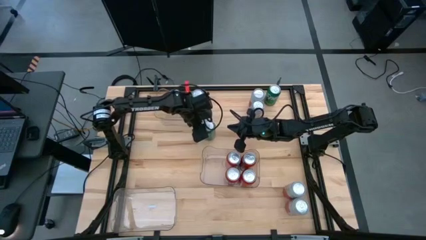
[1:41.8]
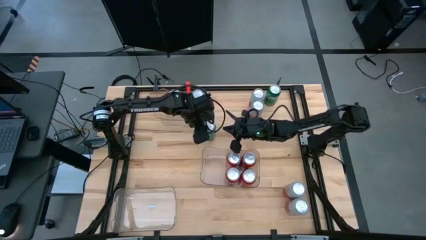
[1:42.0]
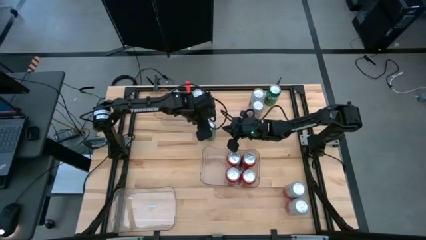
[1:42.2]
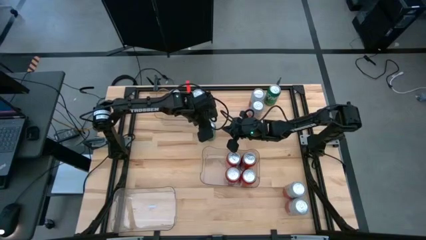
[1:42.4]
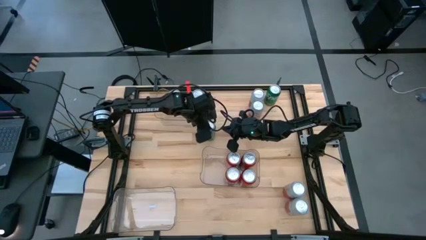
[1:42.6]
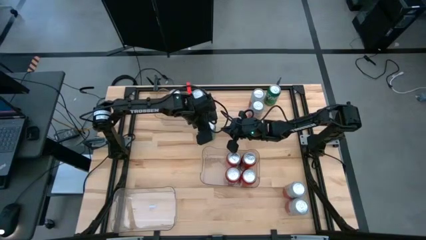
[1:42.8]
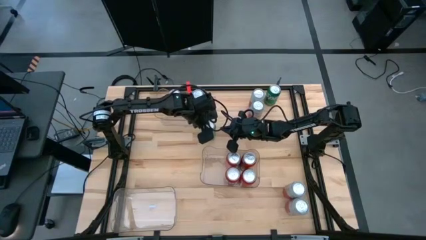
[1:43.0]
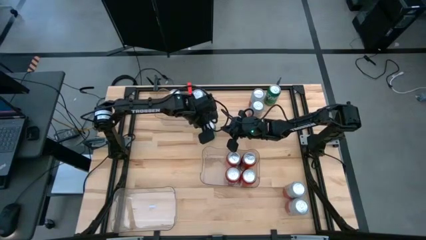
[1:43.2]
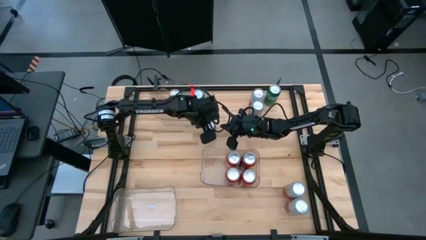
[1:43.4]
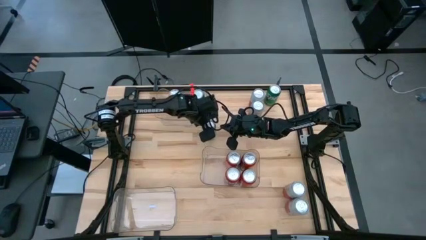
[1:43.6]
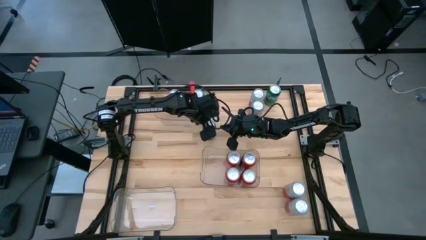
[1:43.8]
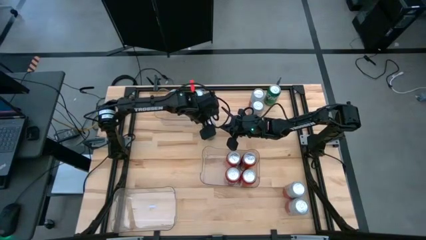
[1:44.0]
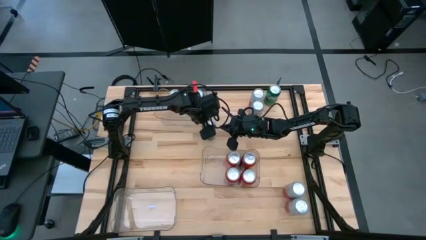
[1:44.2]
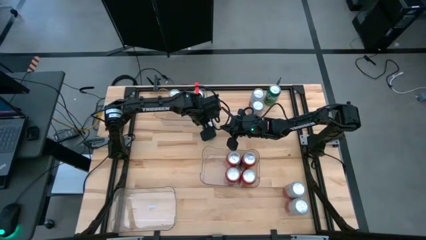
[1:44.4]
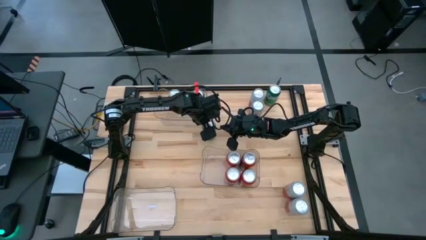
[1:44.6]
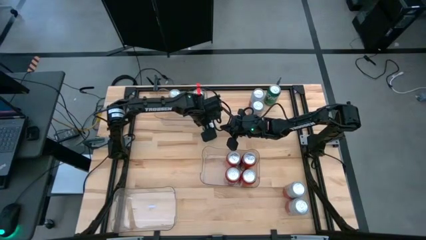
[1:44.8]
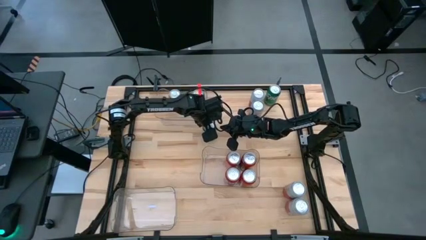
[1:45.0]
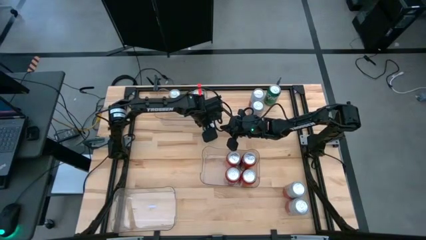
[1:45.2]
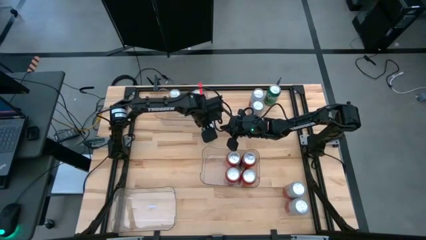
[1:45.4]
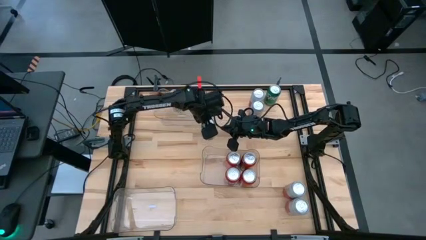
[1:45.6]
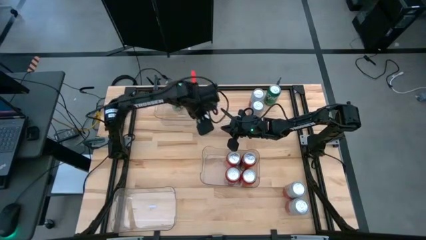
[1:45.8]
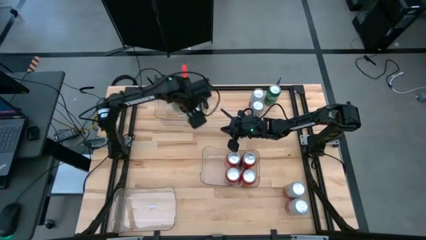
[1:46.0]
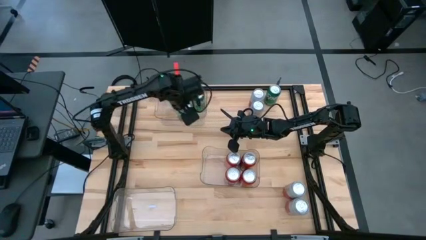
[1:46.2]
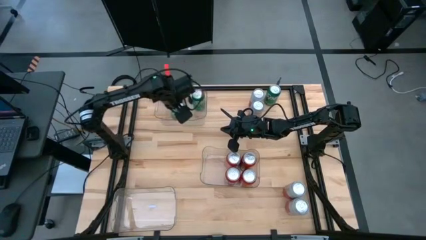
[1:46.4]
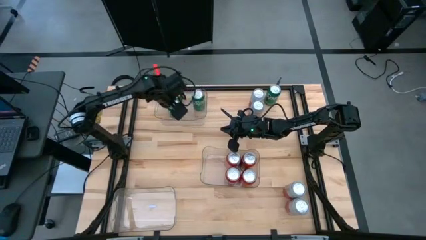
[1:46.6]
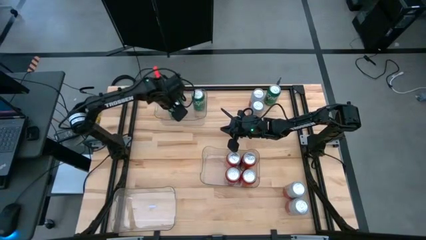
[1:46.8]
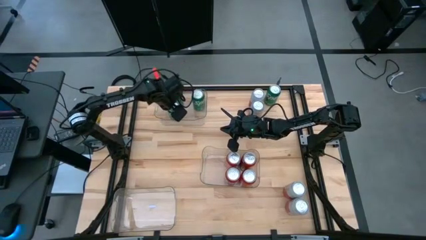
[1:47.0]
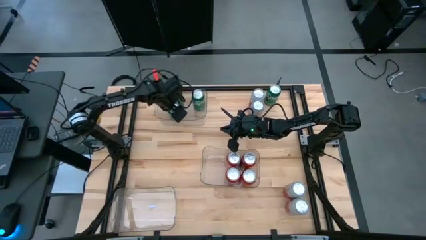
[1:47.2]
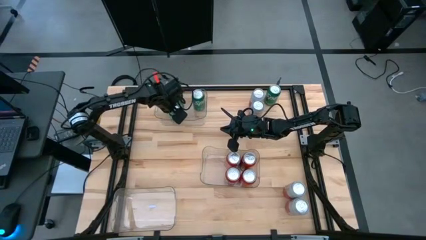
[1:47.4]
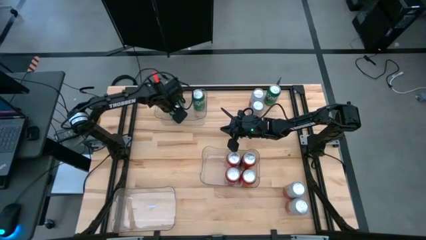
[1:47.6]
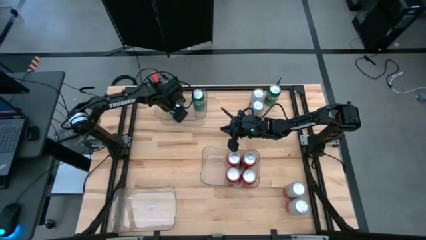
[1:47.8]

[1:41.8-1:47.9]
Task: Sort soda cans
Put the sprite soda can into the top left transparent bin

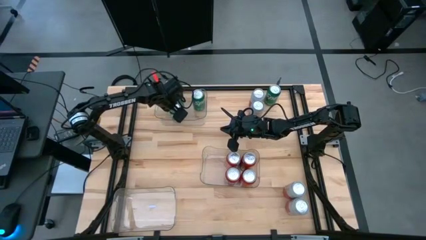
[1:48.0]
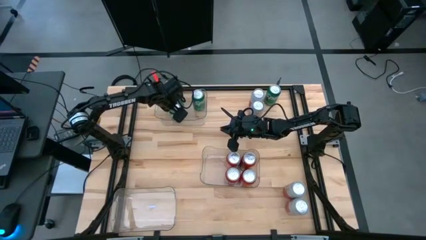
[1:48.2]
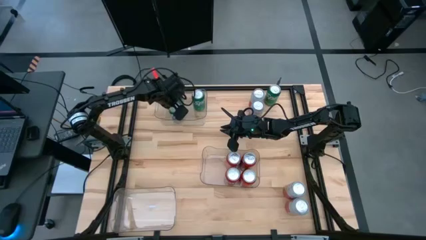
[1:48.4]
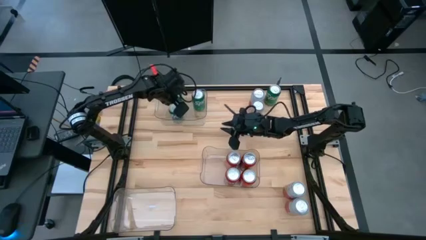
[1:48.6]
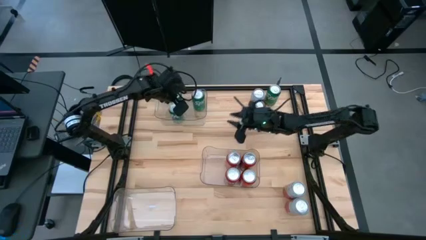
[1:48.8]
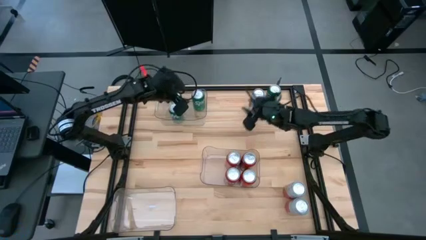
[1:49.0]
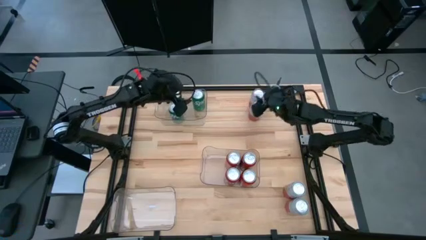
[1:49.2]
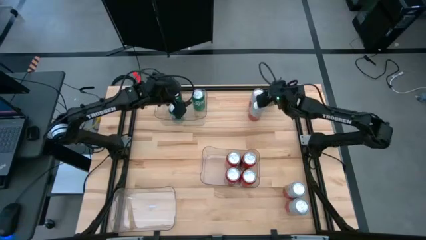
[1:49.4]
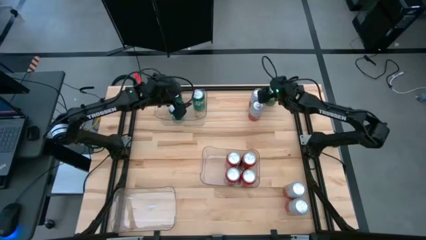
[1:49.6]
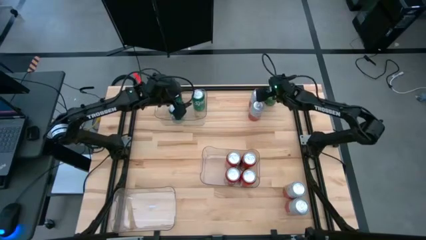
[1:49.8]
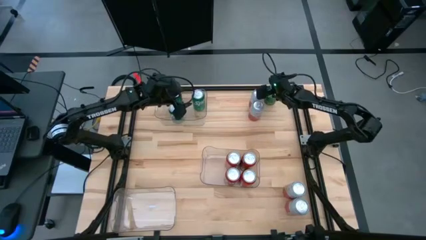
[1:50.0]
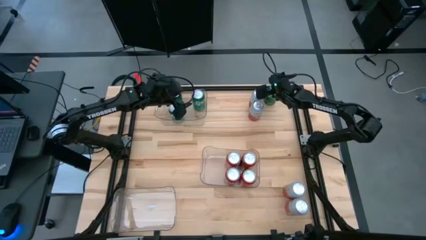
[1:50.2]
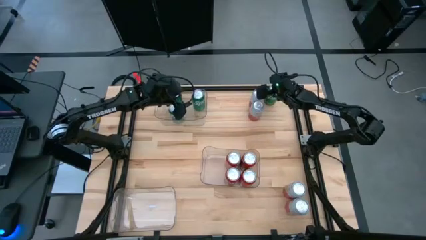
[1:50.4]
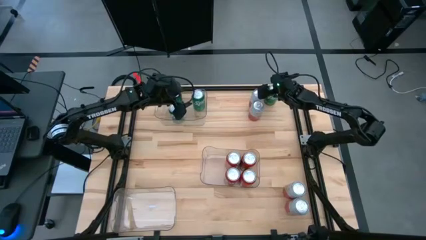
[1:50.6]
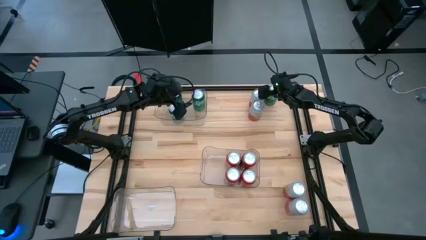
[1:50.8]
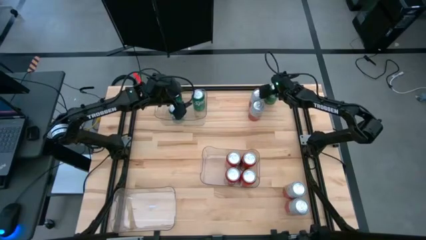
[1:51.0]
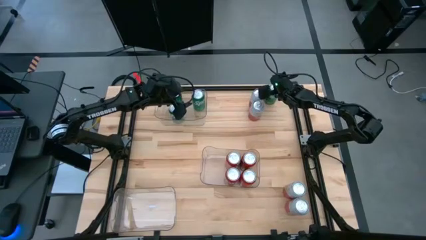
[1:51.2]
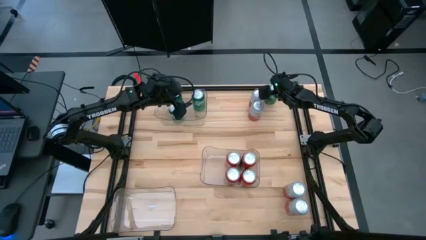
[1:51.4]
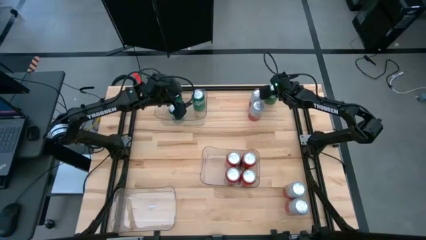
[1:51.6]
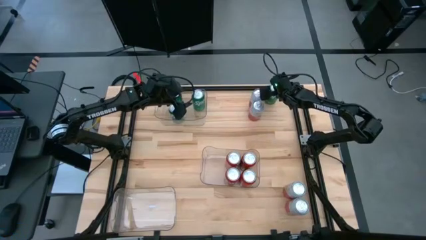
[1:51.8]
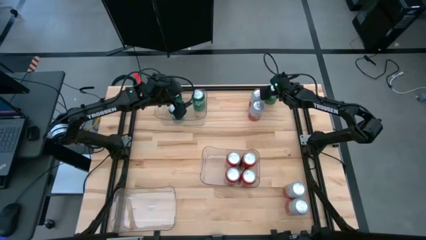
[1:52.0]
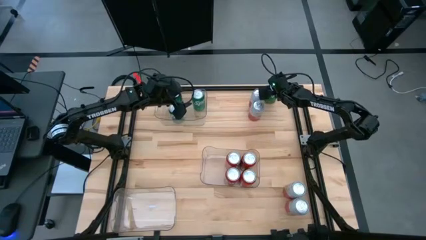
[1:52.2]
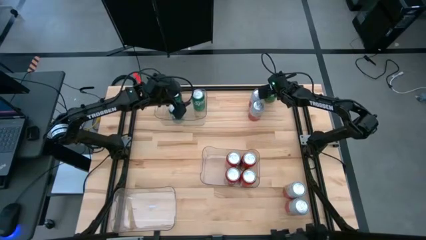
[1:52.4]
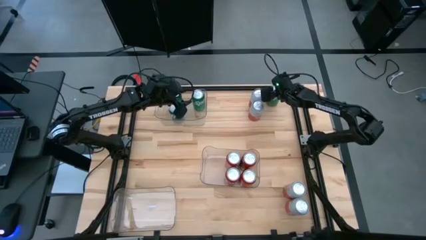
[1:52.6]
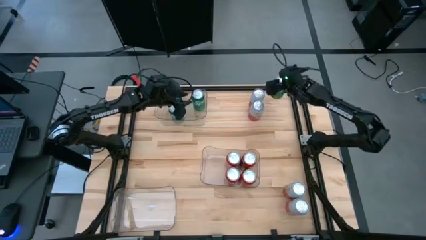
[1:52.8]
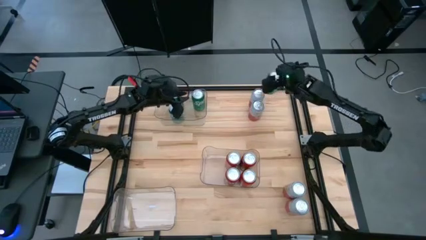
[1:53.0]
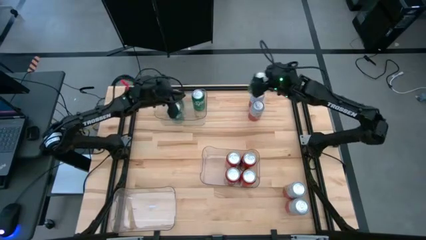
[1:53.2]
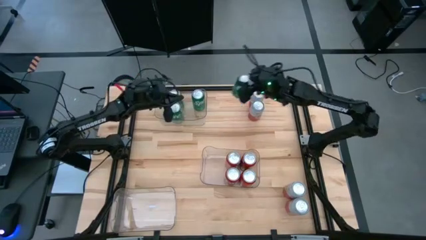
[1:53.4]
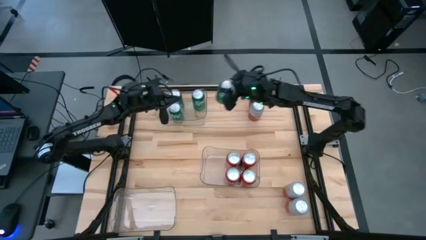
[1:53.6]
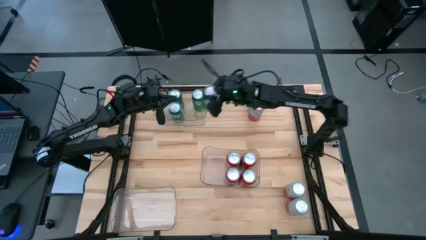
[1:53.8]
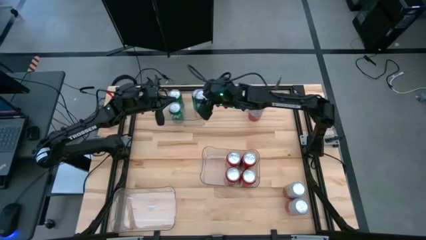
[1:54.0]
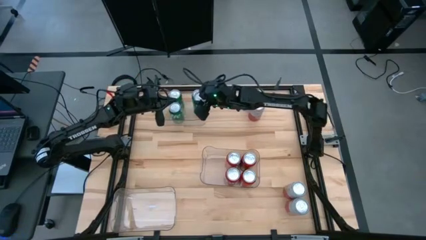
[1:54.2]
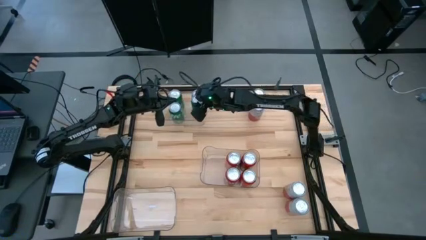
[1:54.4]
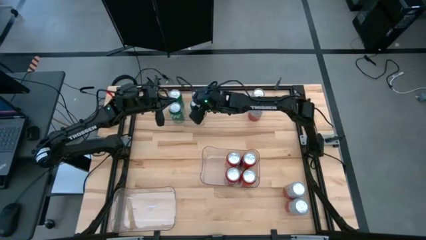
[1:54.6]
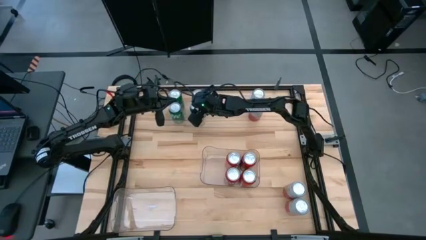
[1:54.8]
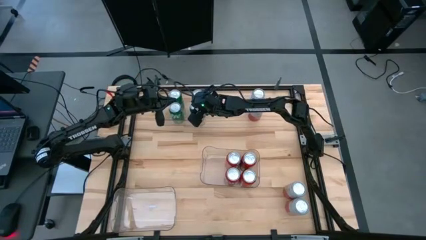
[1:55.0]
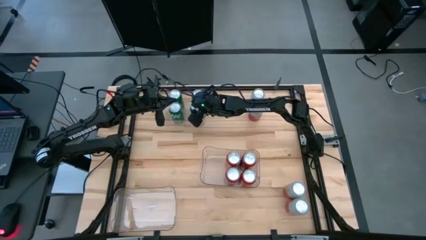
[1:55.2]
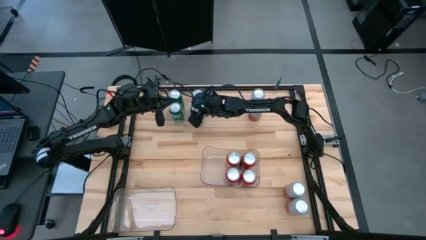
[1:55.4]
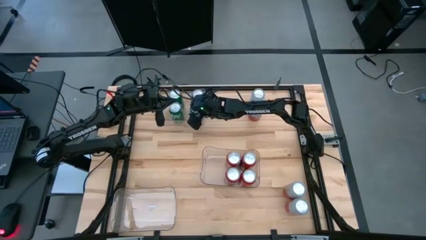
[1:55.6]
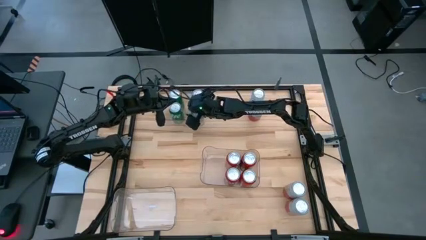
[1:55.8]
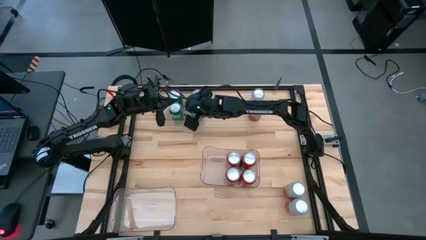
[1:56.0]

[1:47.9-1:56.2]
Put the sprite soda can into the top left transparent bin

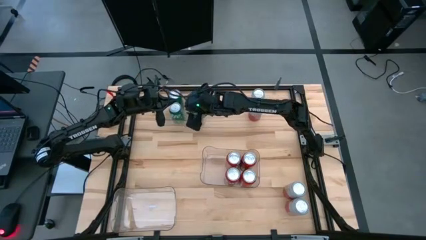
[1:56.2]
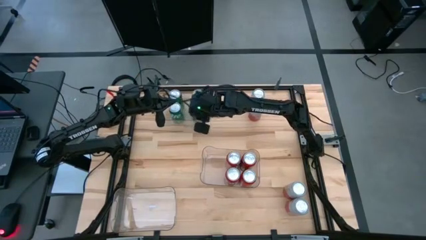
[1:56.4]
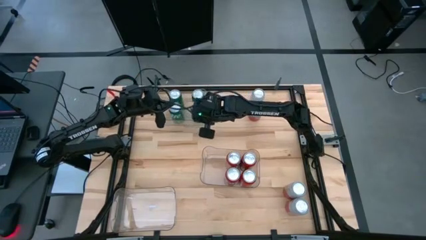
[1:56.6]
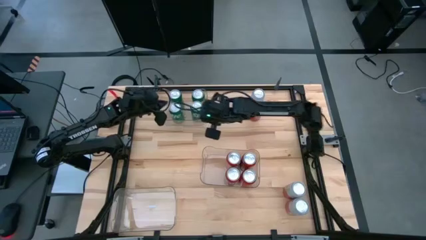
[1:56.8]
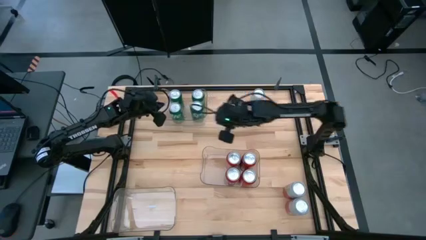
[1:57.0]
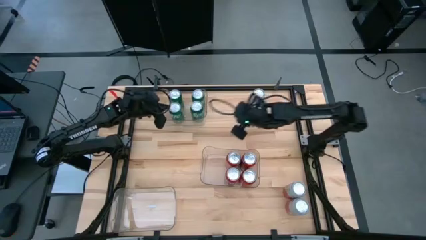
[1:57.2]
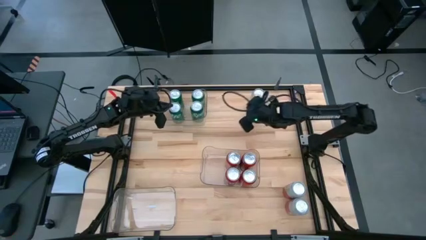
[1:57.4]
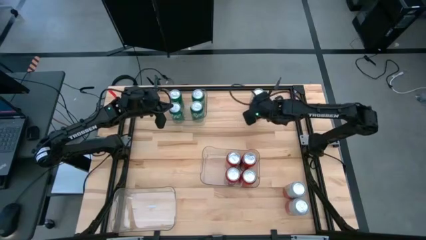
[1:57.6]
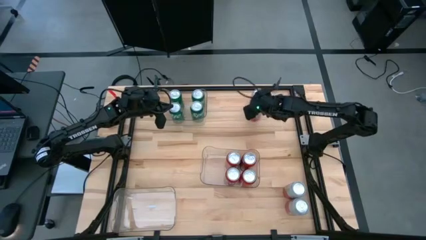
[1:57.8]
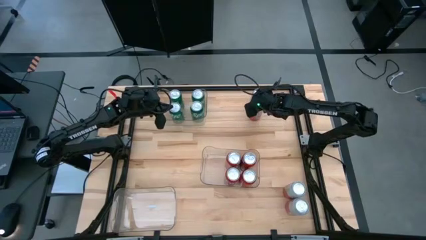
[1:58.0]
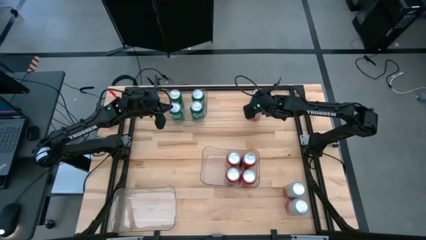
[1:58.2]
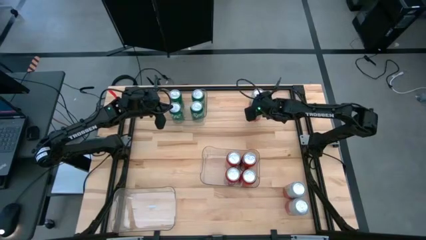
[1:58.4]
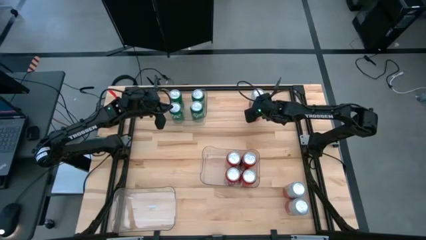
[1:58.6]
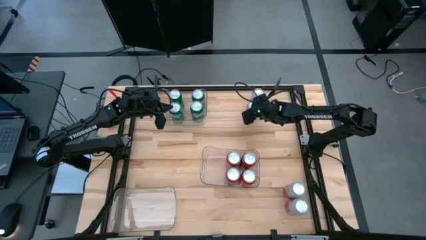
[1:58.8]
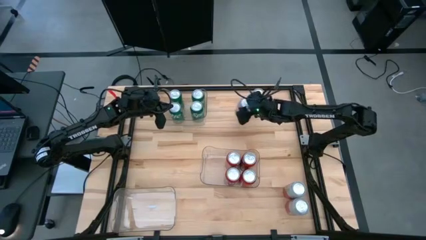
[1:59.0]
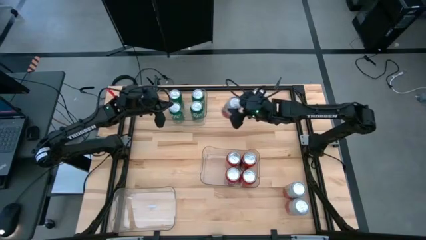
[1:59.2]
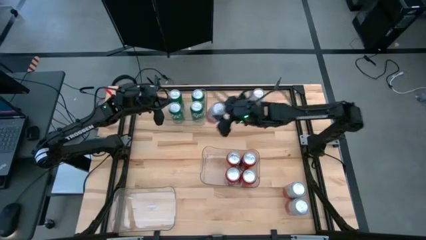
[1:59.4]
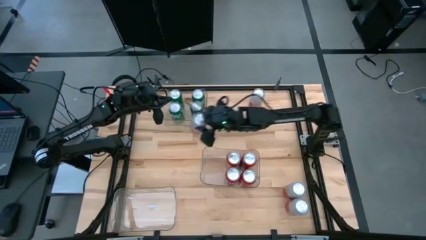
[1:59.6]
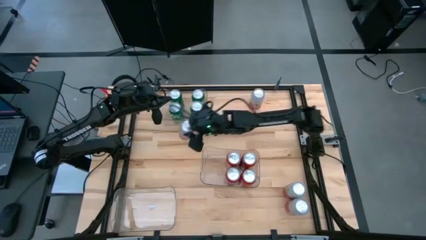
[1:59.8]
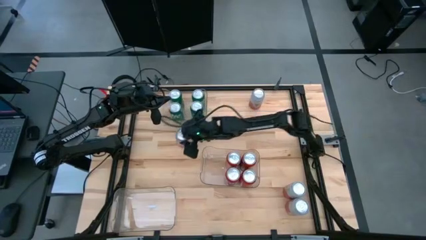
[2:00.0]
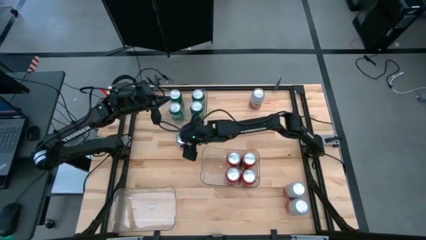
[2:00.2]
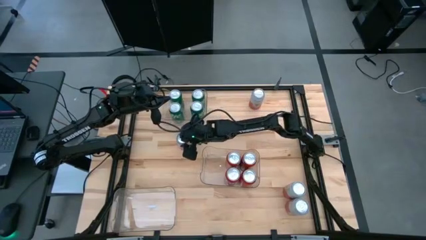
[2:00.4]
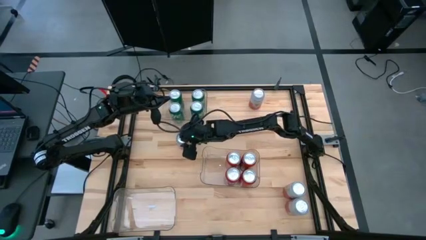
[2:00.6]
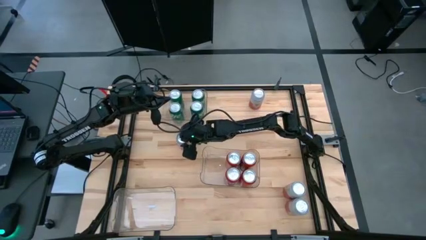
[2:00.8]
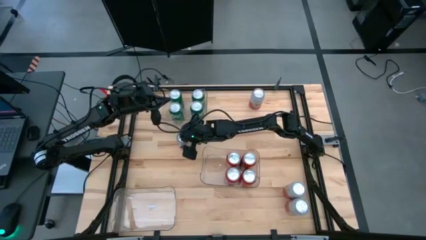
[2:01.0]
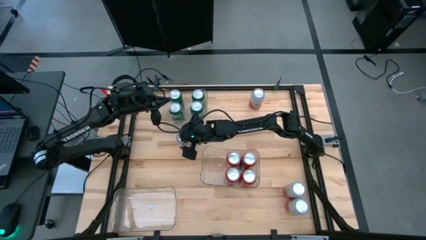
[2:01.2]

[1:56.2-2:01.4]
Move the pink white soda can from top right to top left
